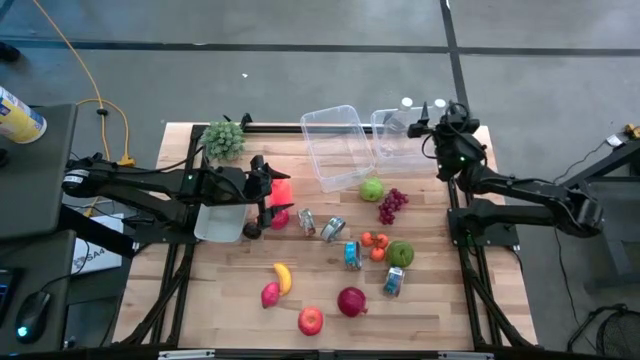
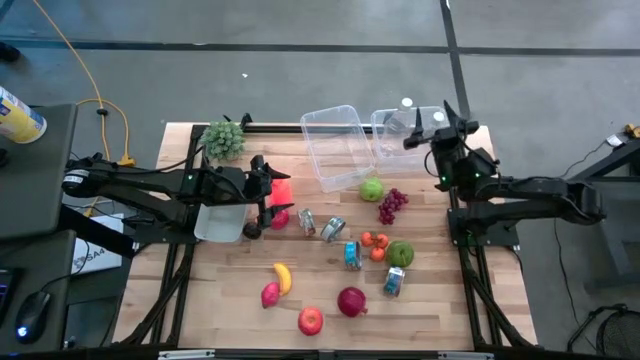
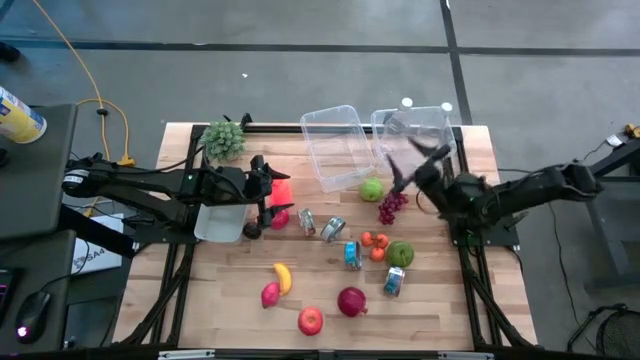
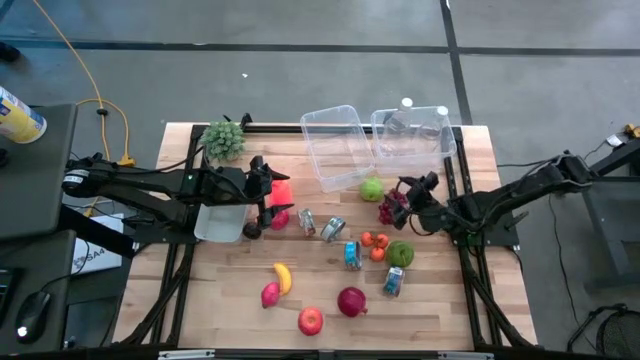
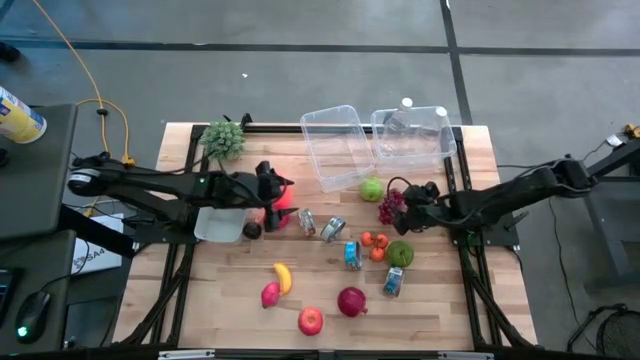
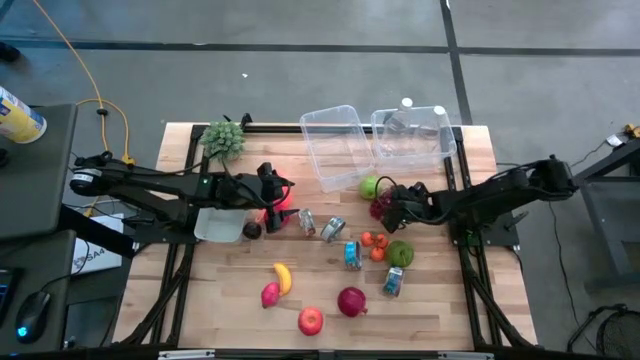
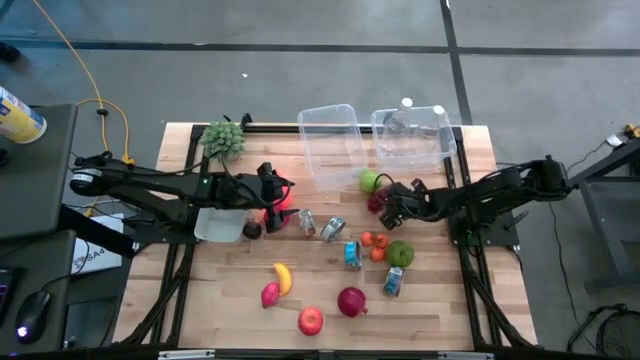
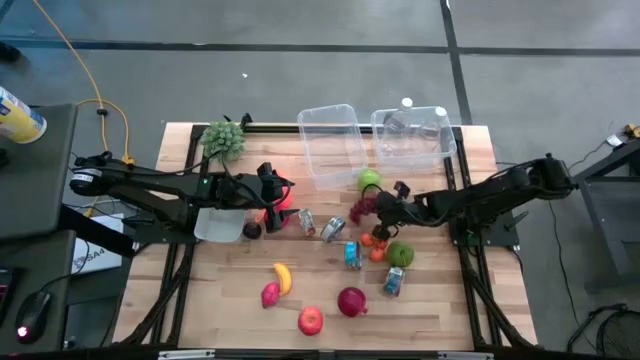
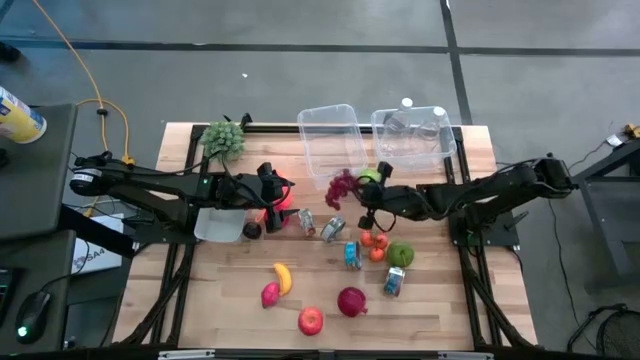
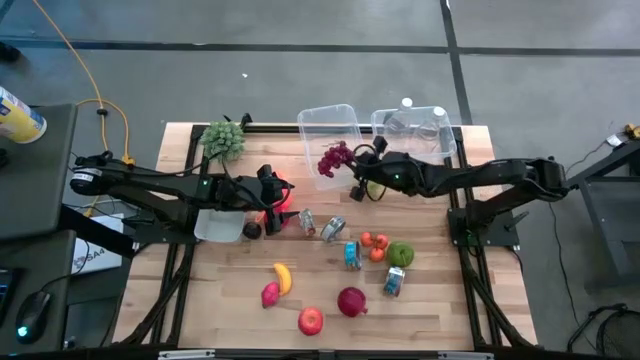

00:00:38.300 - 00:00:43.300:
Task: Pick & Place Food Item
Put the grape into the left transparent bin

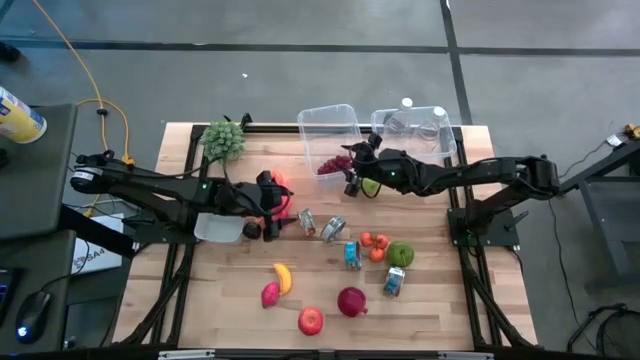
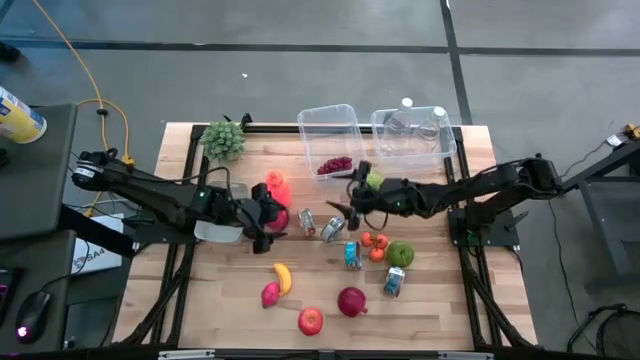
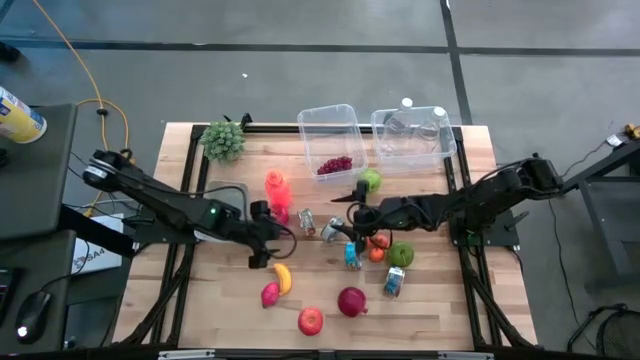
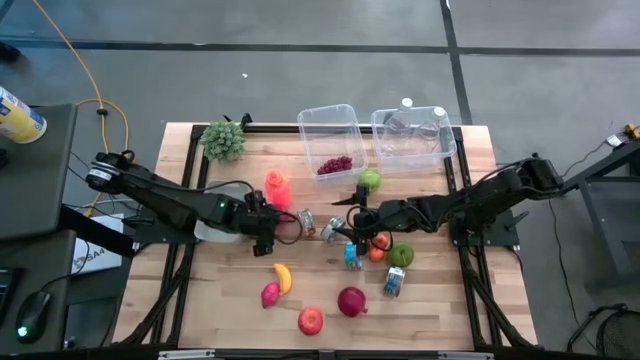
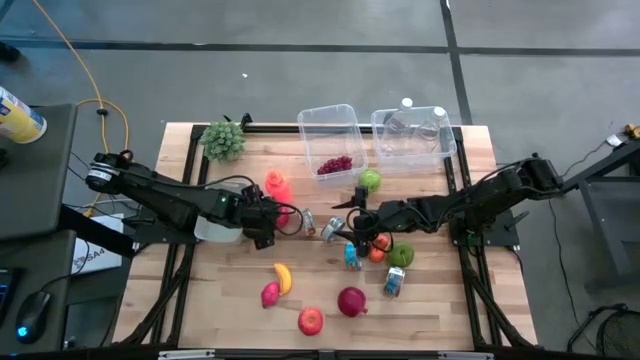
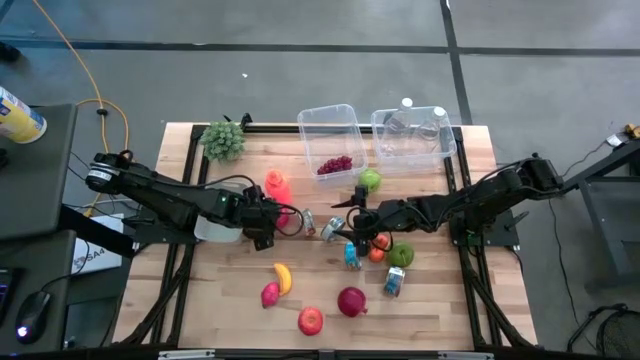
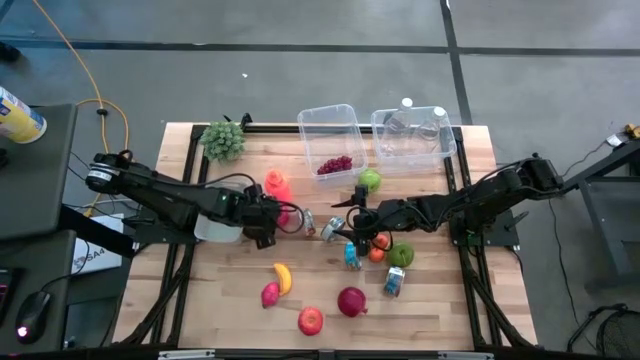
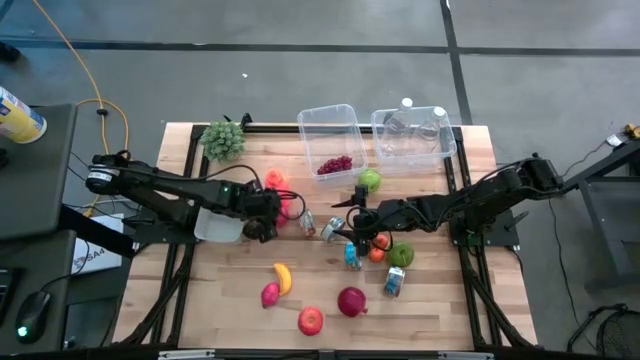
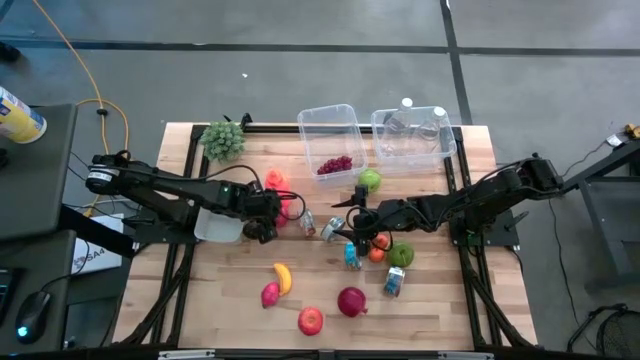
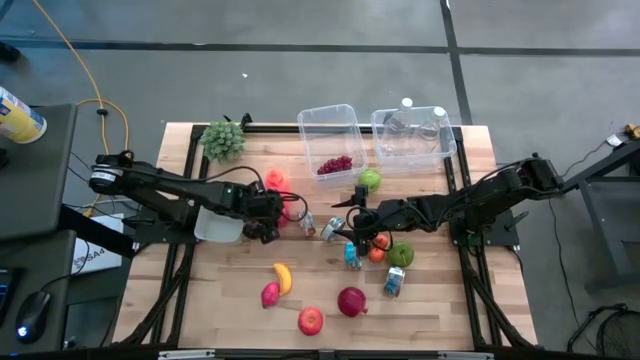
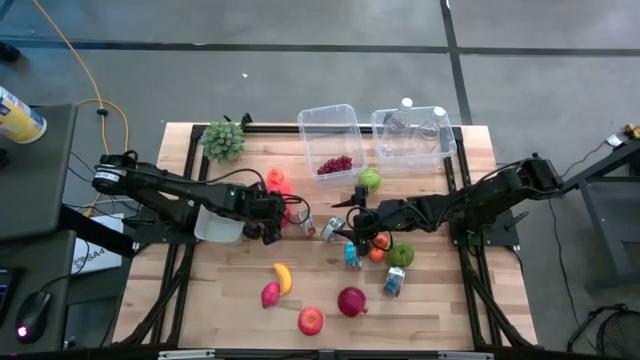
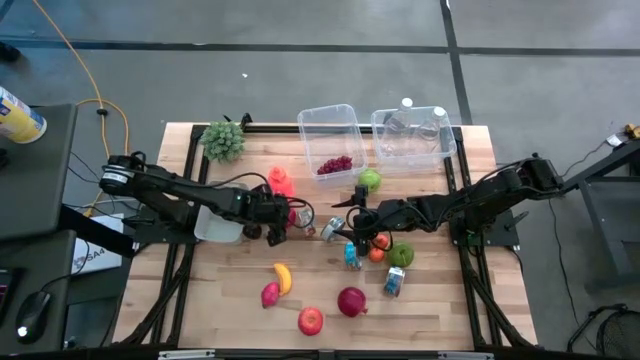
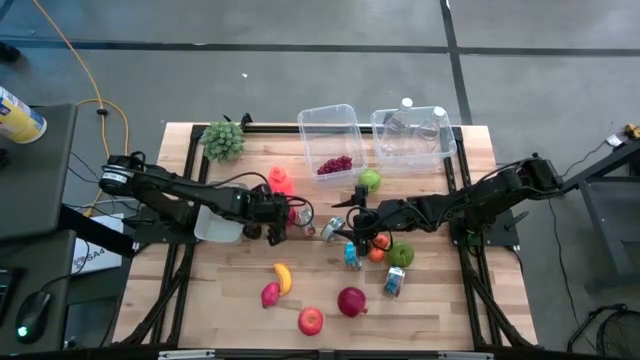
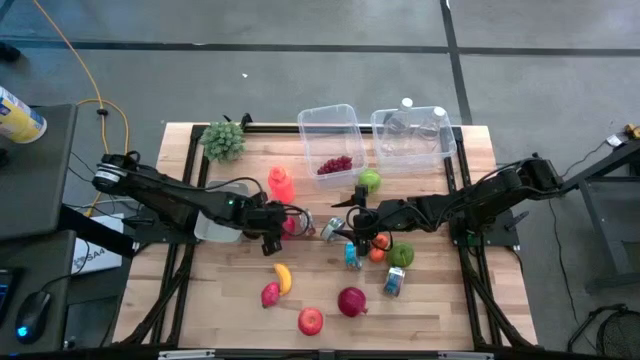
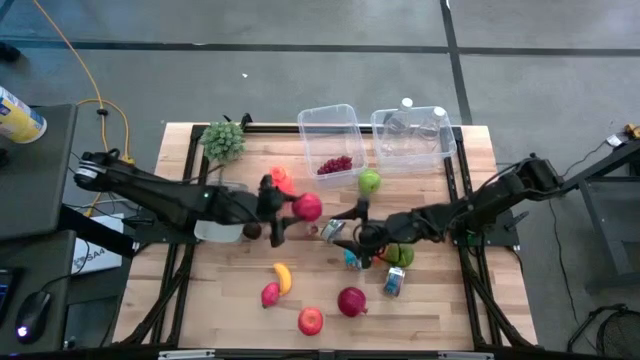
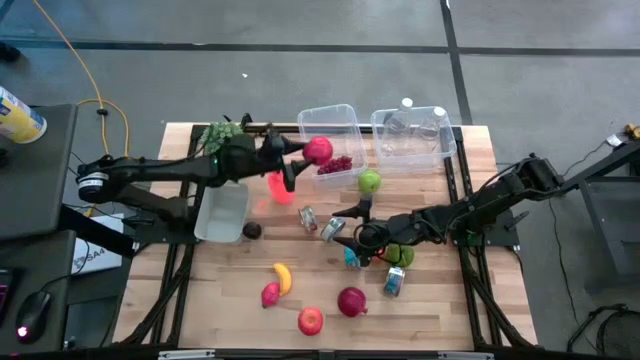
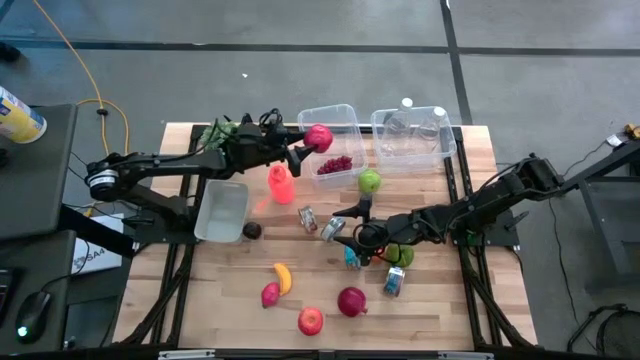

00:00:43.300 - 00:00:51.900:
Put the top red apple into the left transparent bin

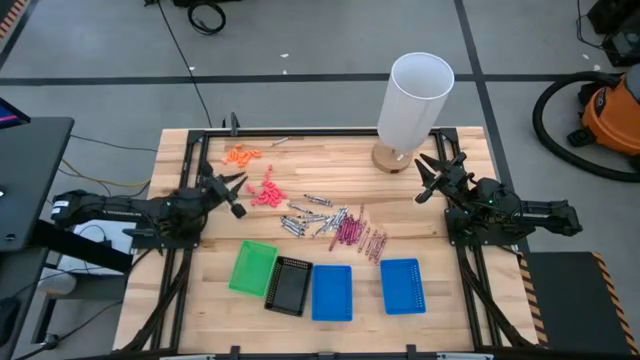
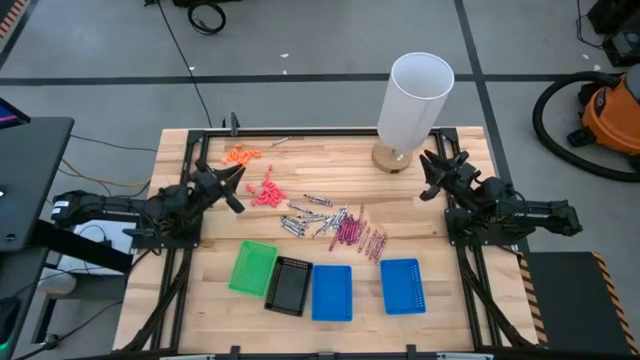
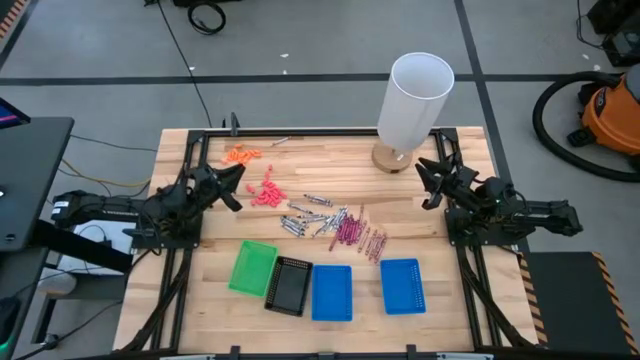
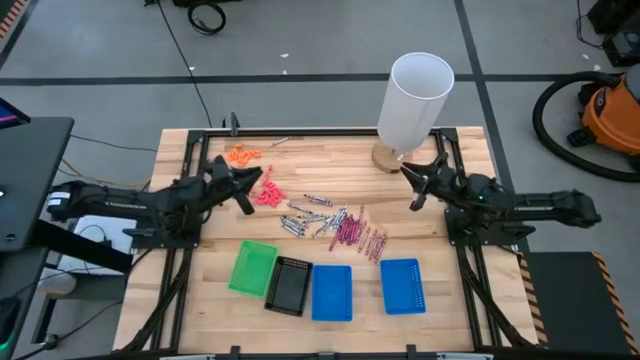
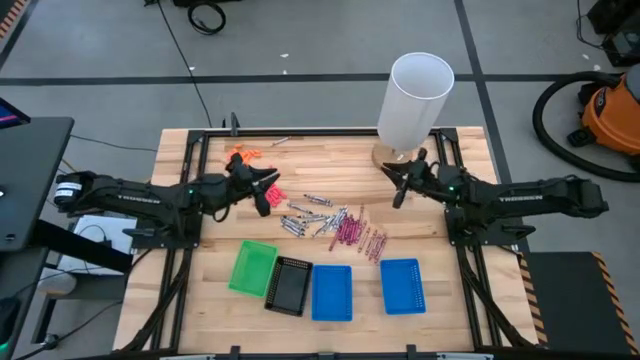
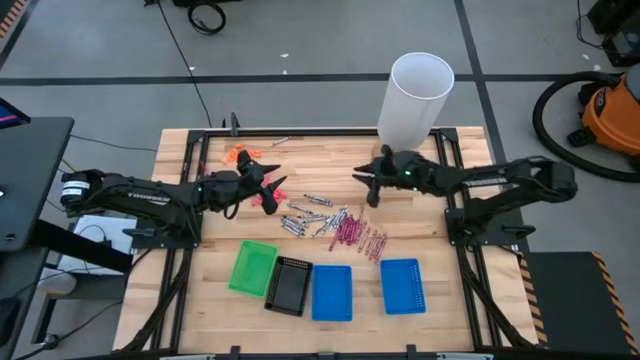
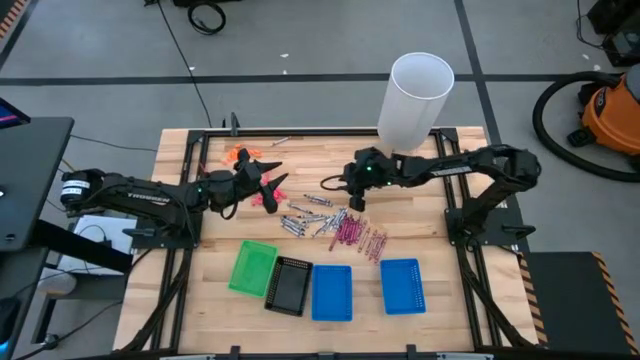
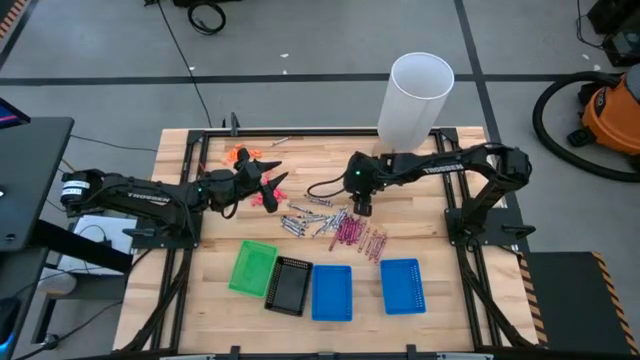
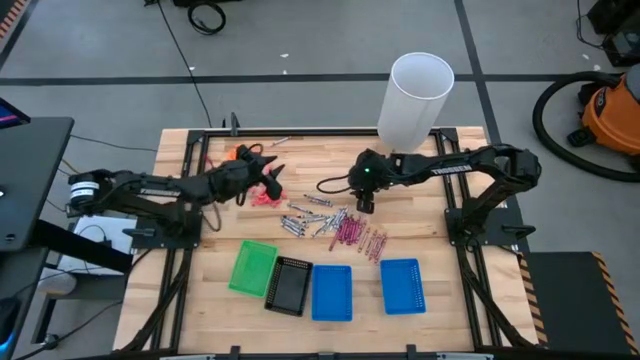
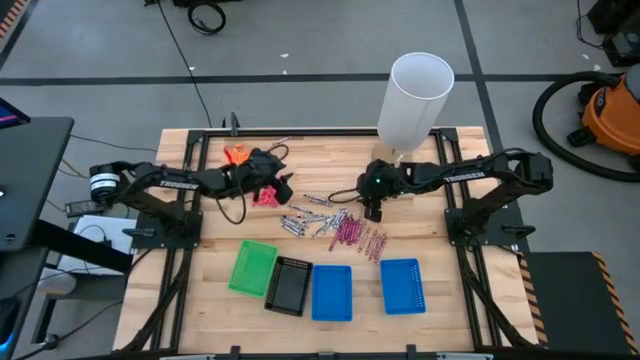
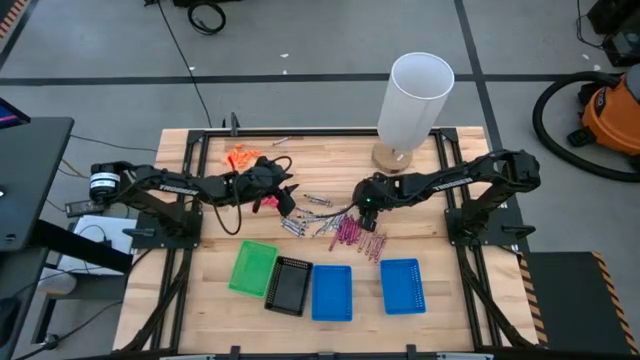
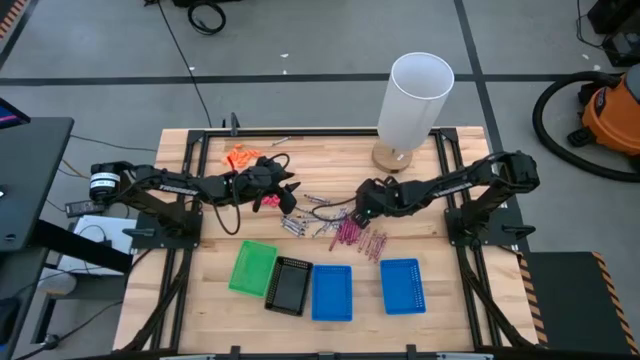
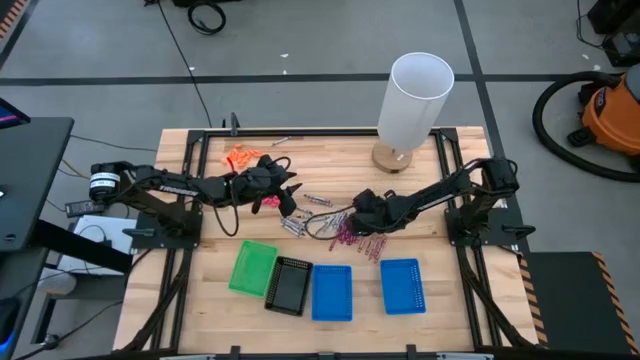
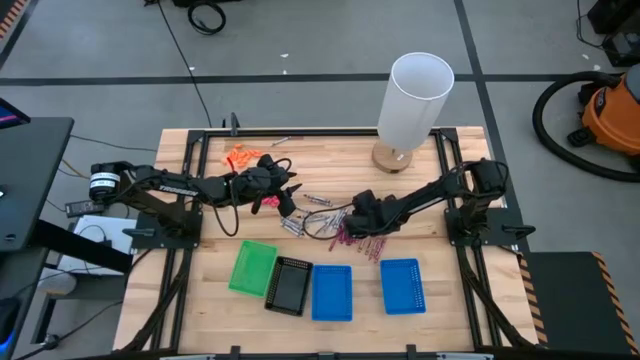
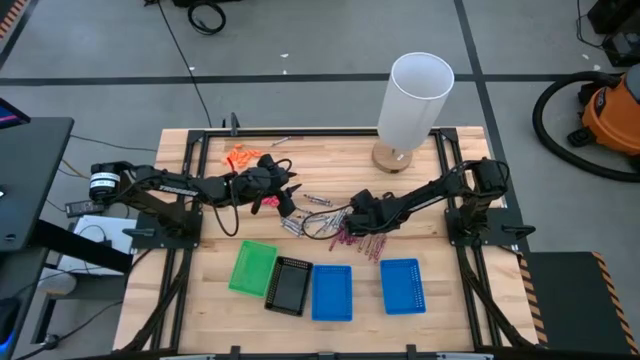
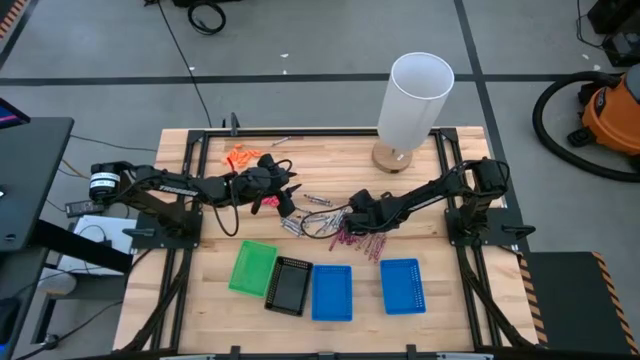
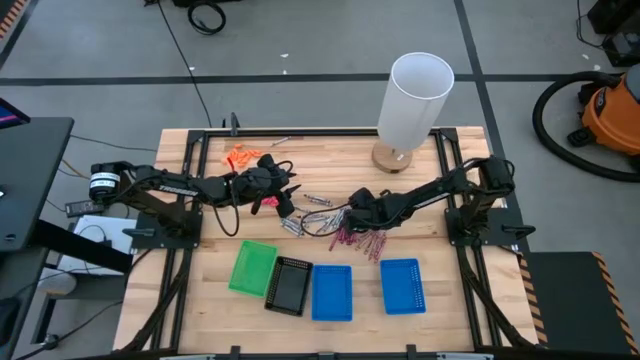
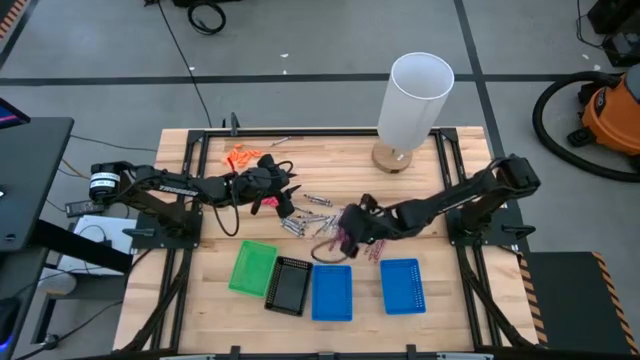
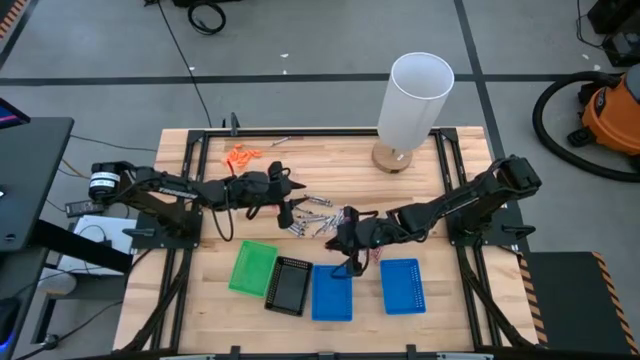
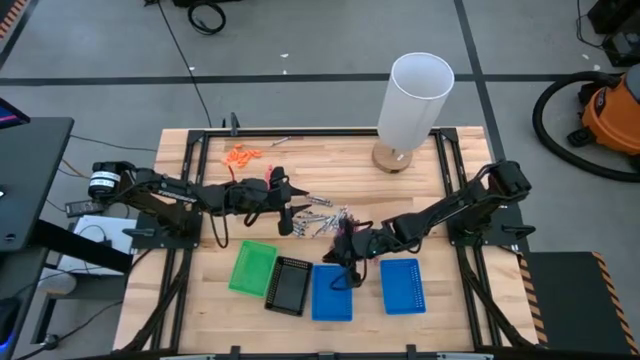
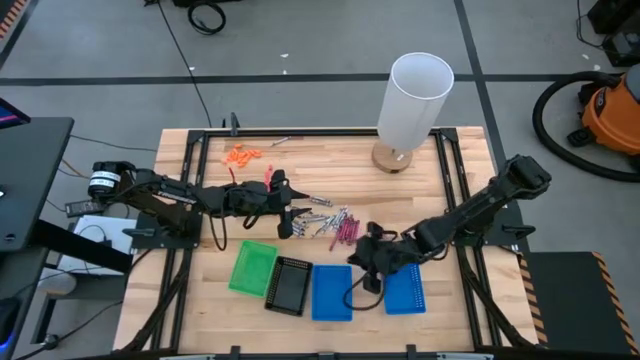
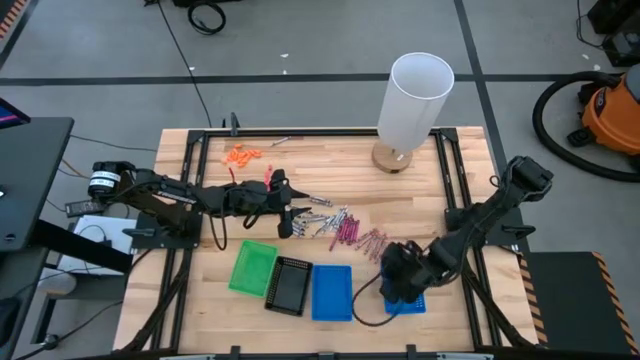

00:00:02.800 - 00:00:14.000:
Task: Sort crayons
Put the pink crayon into the right blue bin
